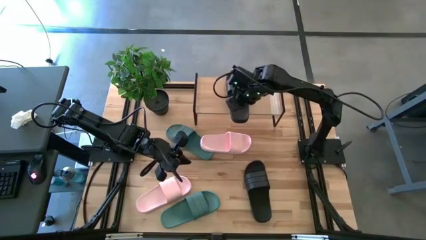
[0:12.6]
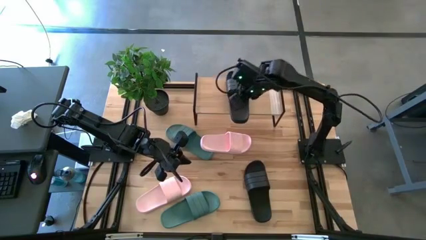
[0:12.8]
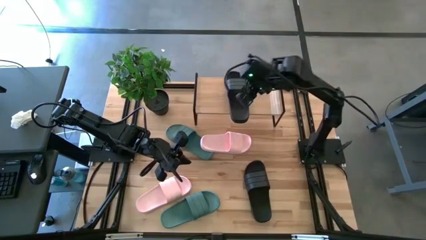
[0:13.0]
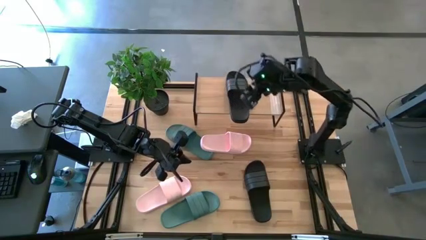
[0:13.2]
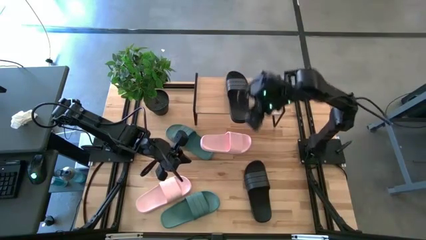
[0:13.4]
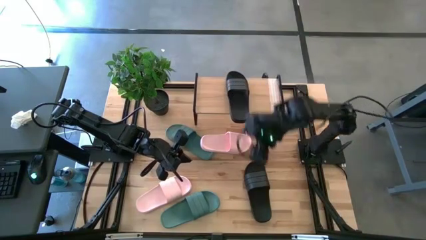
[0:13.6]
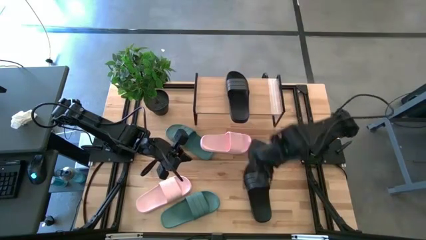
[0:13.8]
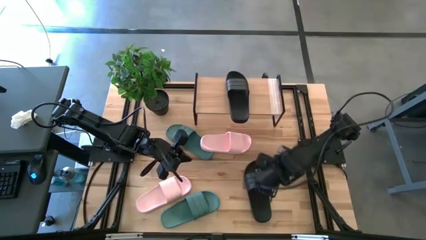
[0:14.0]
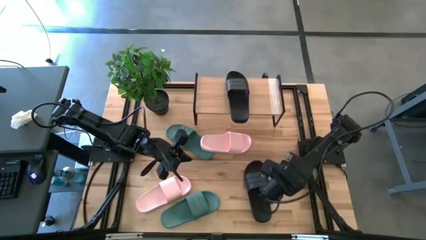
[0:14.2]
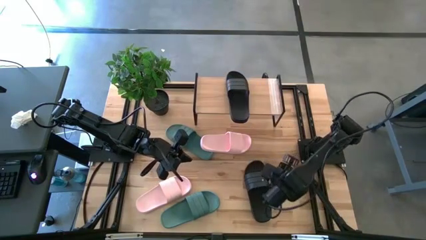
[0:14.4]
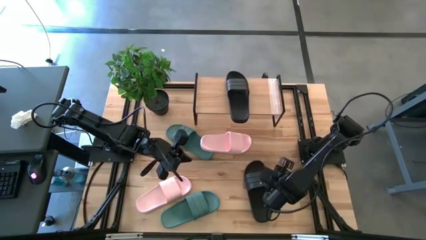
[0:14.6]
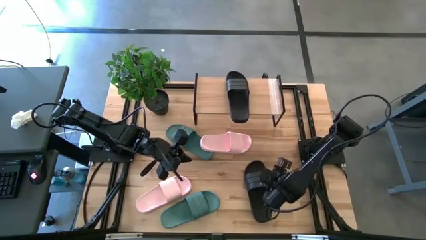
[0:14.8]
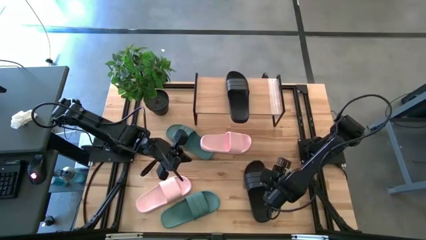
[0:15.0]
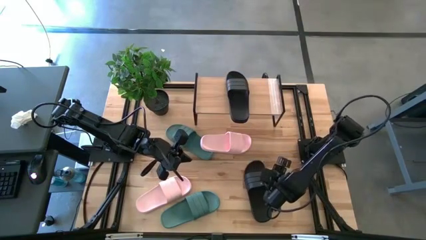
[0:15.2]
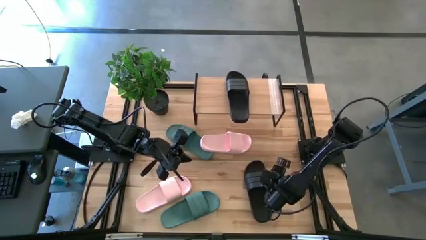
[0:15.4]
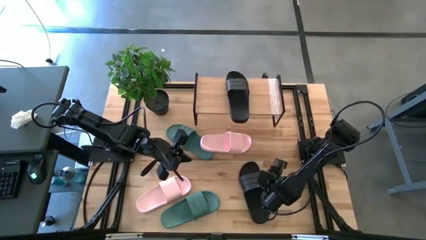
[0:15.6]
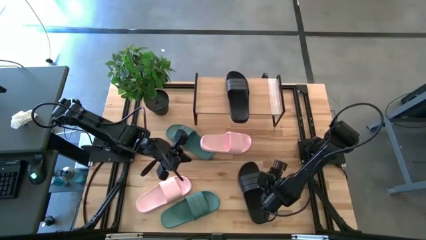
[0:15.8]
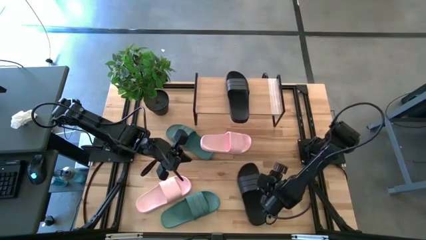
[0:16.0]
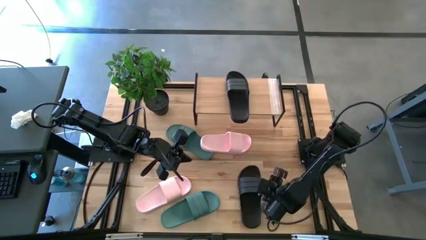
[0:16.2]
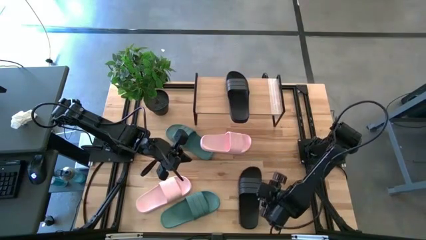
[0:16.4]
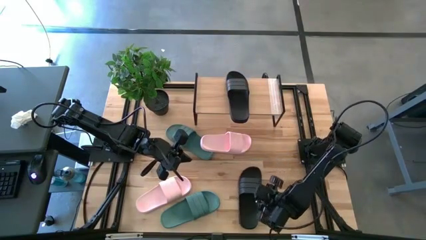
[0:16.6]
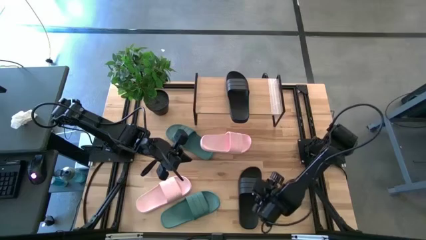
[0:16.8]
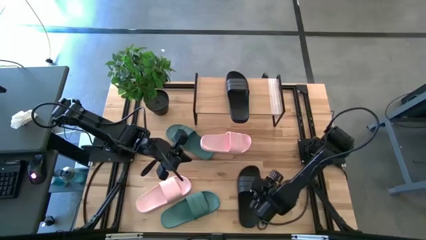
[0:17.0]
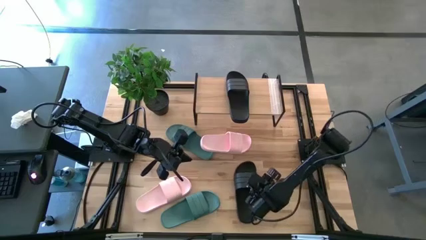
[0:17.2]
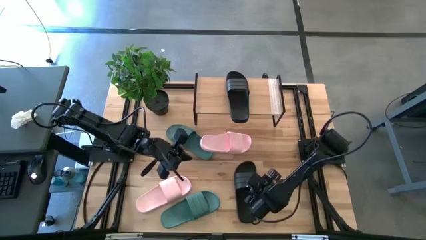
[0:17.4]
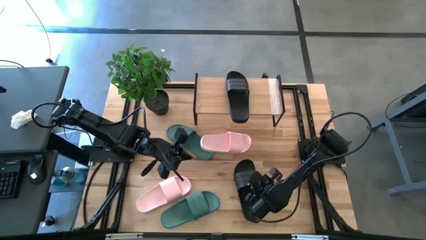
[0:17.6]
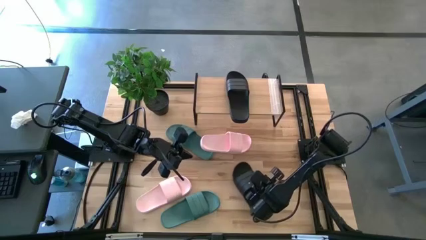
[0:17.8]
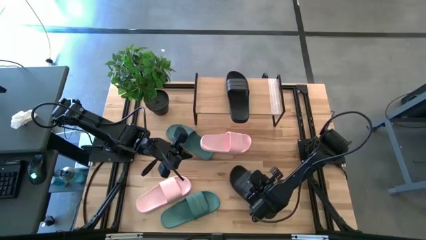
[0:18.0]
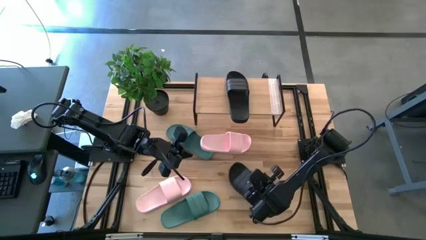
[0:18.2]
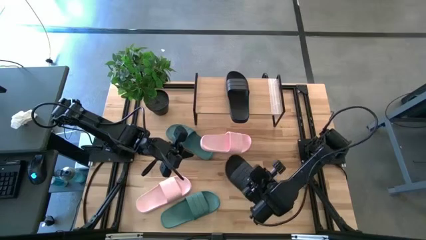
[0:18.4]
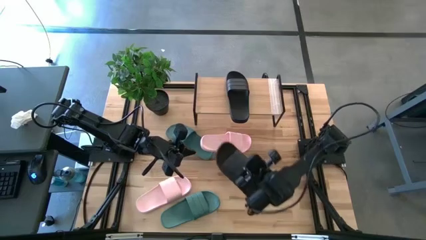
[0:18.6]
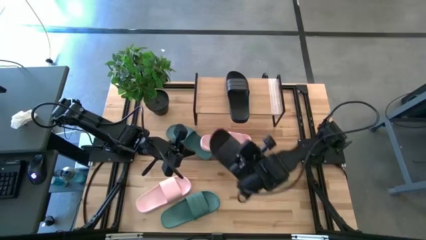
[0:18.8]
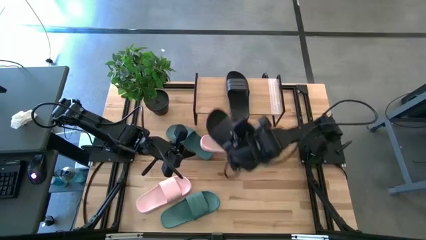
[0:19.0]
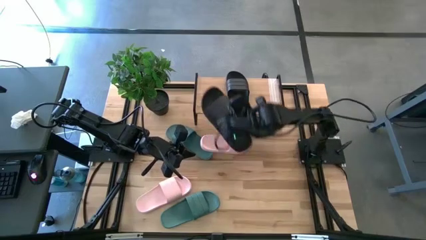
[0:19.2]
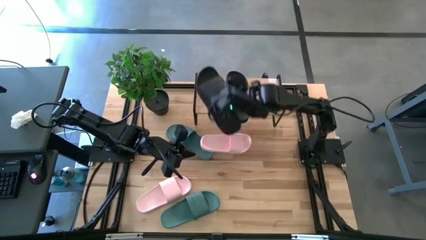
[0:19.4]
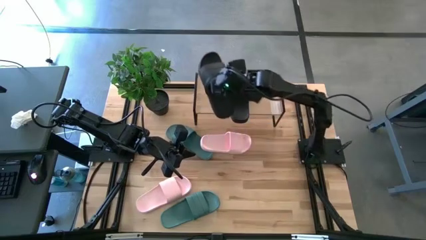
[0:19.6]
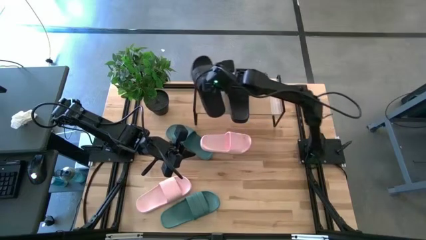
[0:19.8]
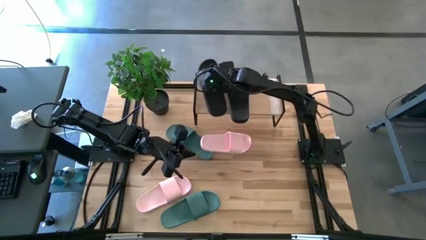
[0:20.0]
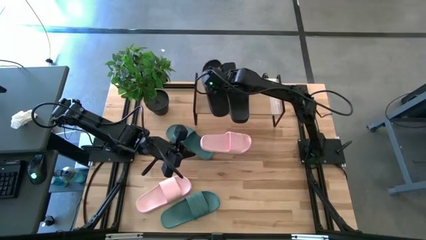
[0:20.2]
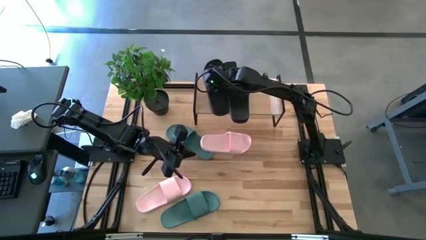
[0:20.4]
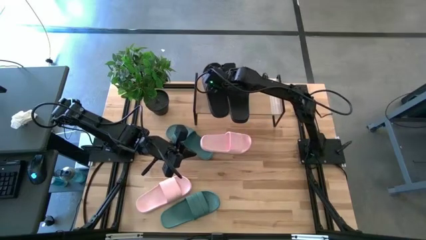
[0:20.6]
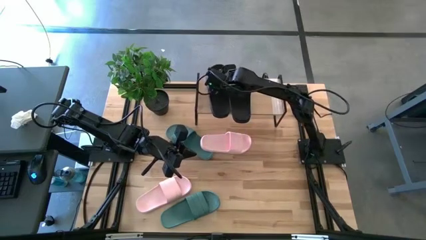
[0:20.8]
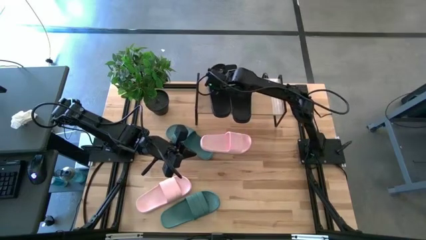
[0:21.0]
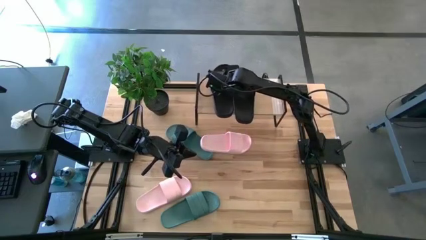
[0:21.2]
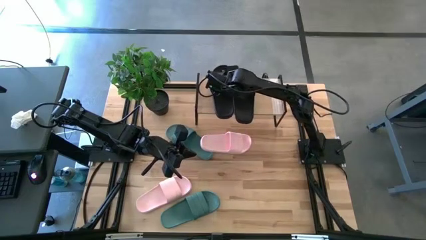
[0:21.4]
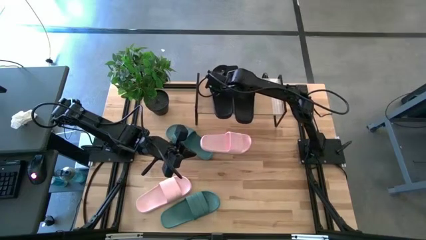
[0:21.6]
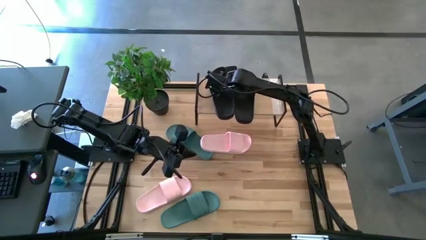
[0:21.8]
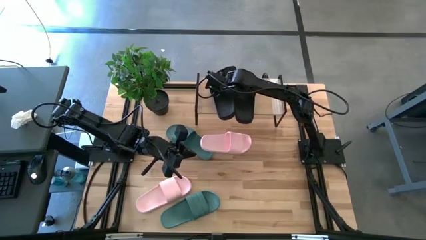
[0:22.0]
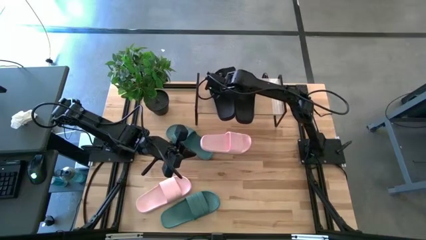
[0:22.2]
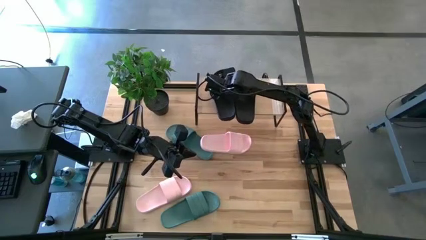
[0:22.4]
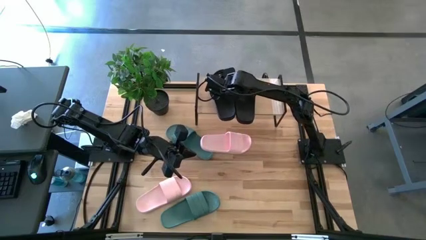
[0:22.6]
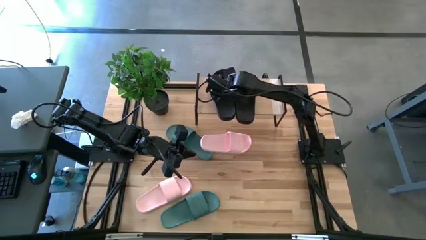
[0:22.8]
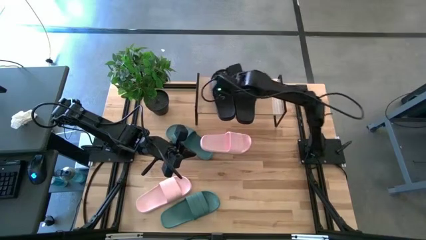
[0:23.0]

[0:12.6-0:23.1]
Task: Pick and place slides into the shelf
Put the black slipper on the shelf
